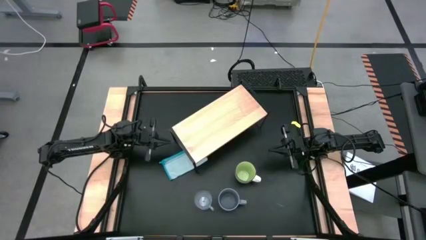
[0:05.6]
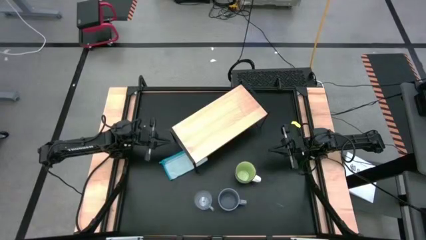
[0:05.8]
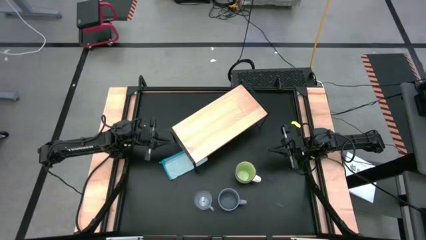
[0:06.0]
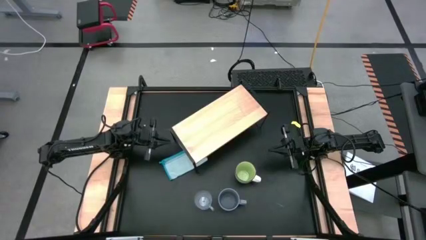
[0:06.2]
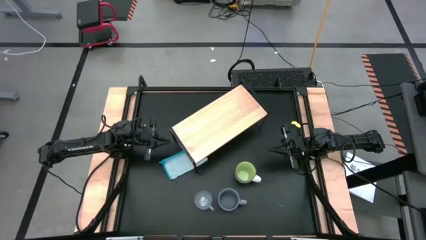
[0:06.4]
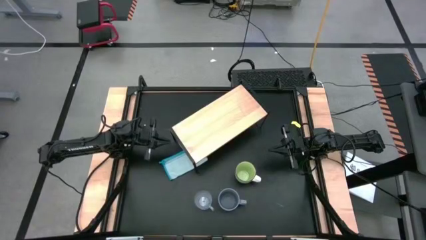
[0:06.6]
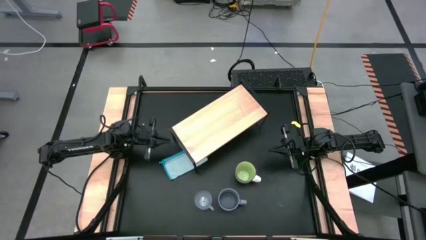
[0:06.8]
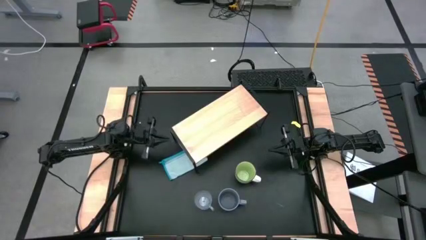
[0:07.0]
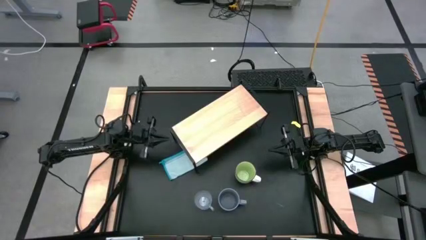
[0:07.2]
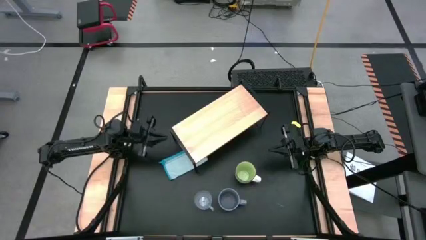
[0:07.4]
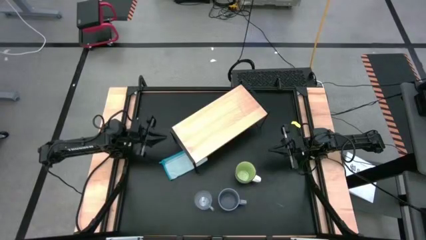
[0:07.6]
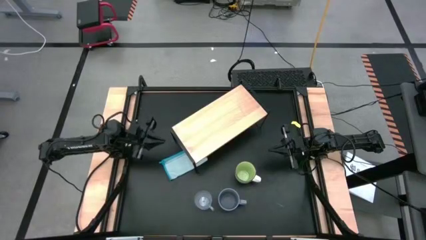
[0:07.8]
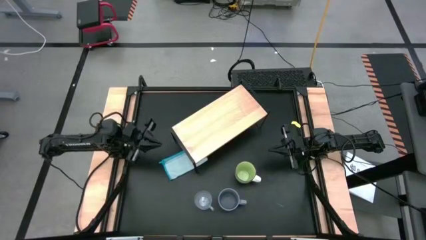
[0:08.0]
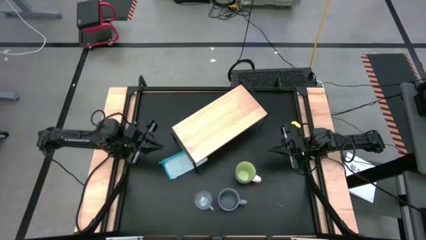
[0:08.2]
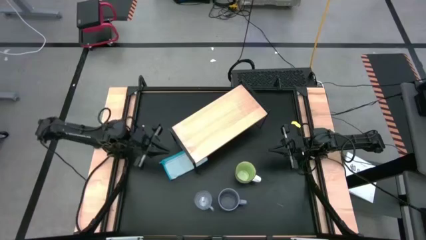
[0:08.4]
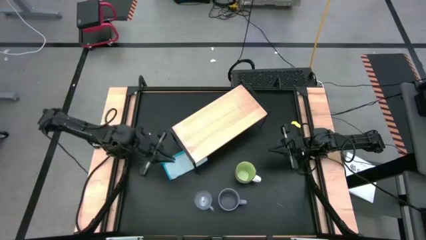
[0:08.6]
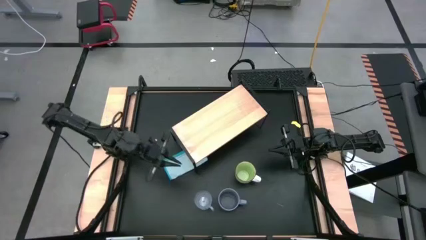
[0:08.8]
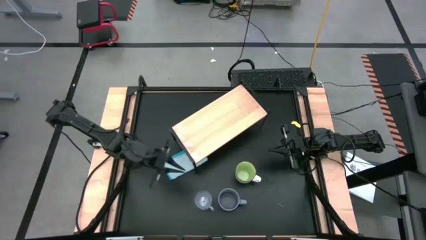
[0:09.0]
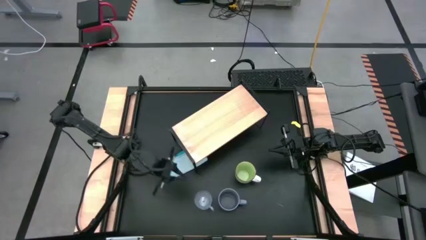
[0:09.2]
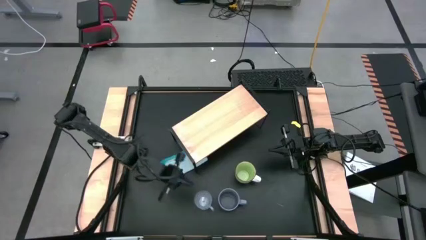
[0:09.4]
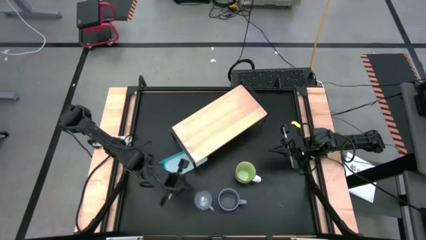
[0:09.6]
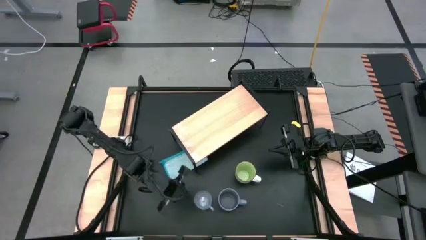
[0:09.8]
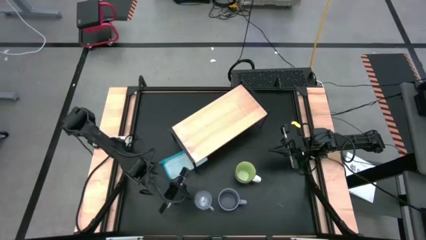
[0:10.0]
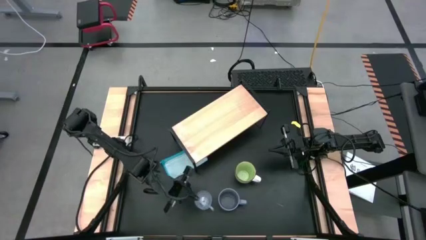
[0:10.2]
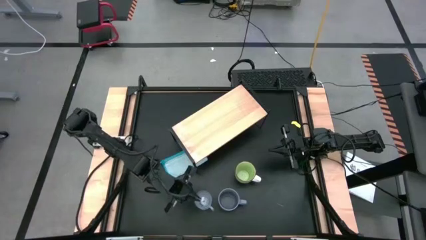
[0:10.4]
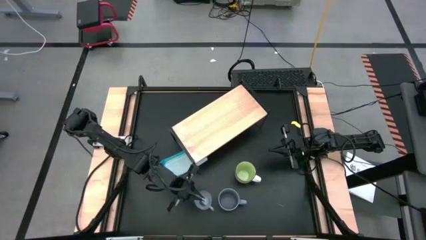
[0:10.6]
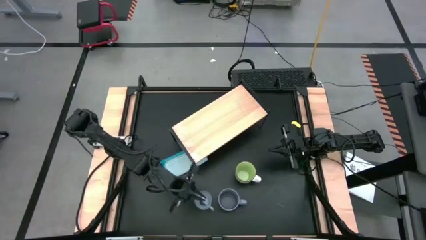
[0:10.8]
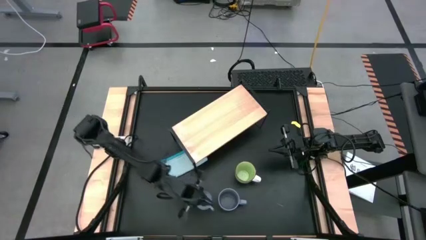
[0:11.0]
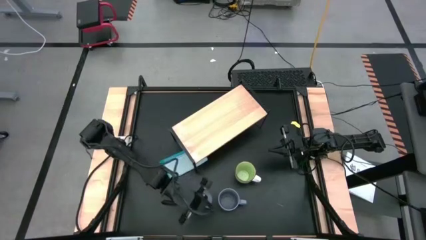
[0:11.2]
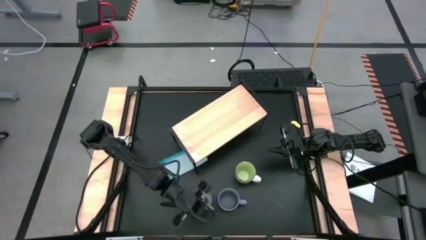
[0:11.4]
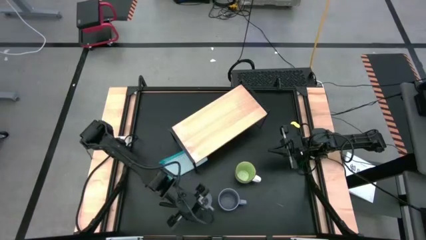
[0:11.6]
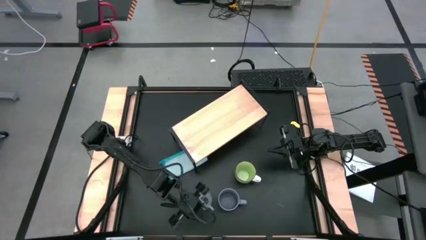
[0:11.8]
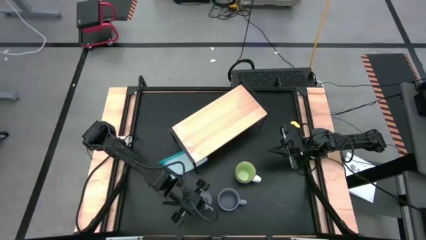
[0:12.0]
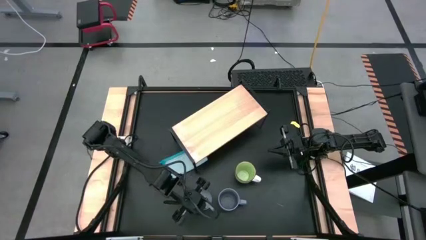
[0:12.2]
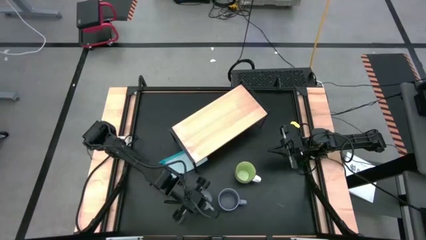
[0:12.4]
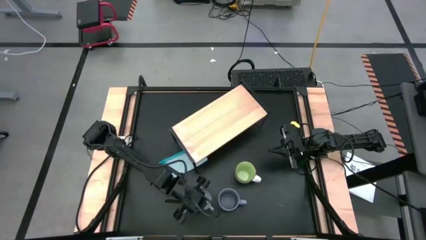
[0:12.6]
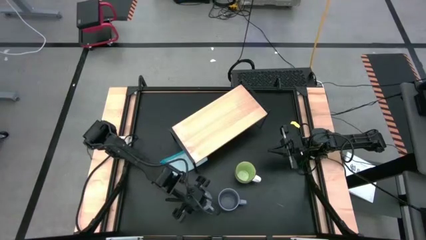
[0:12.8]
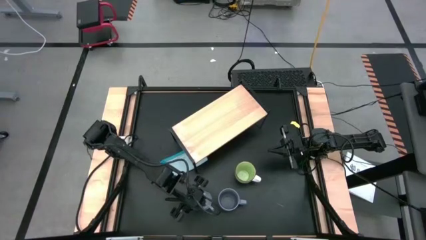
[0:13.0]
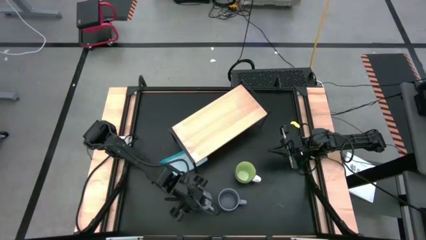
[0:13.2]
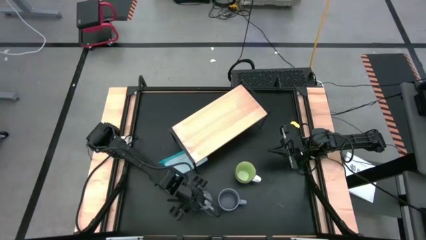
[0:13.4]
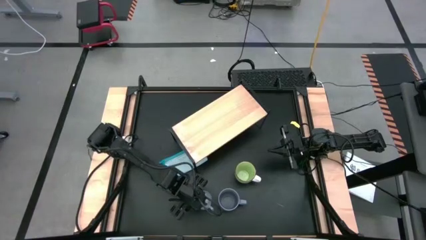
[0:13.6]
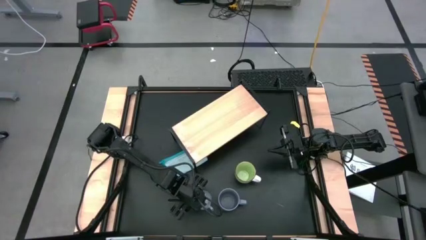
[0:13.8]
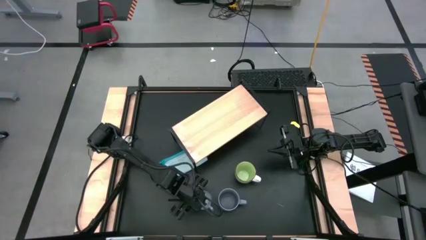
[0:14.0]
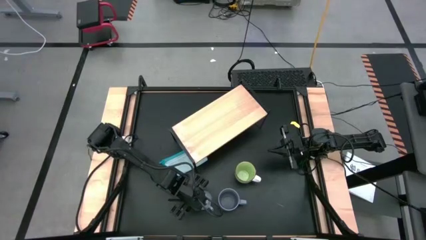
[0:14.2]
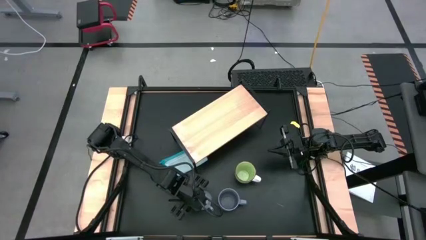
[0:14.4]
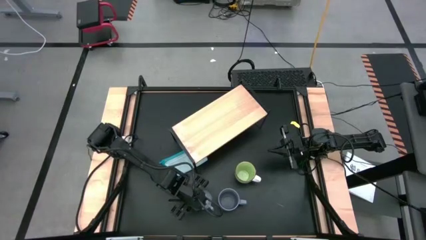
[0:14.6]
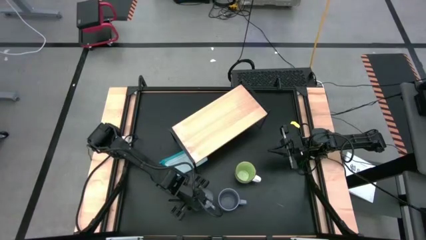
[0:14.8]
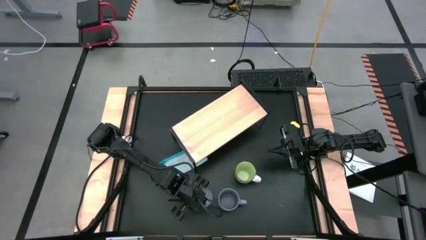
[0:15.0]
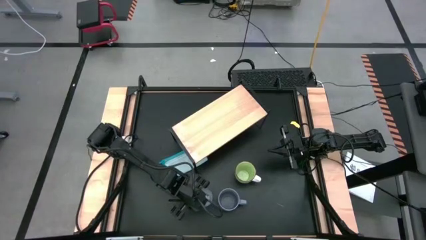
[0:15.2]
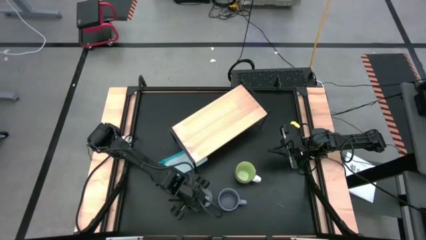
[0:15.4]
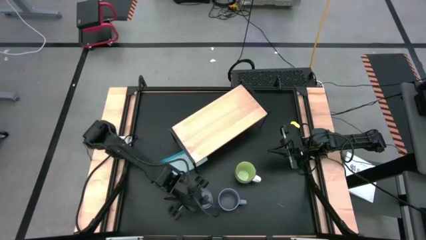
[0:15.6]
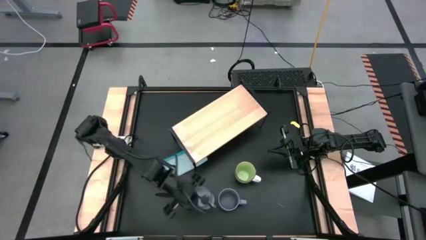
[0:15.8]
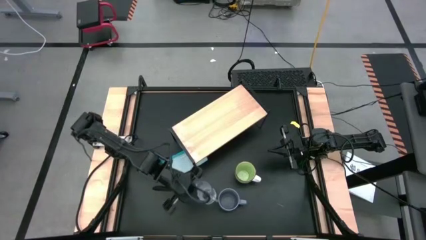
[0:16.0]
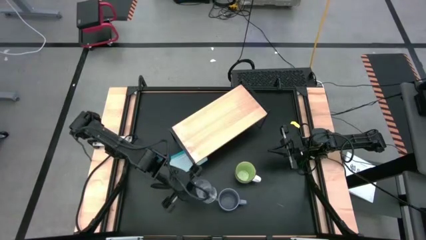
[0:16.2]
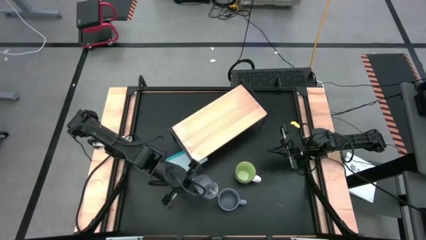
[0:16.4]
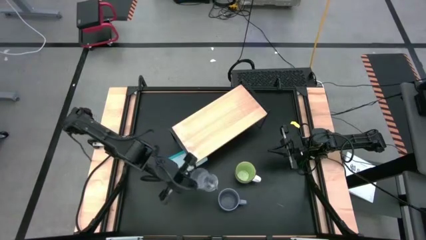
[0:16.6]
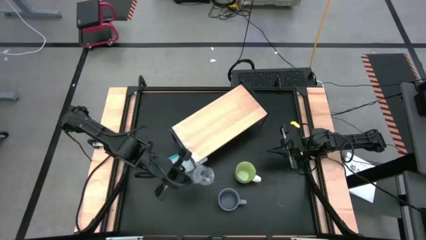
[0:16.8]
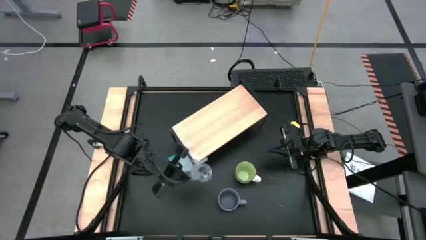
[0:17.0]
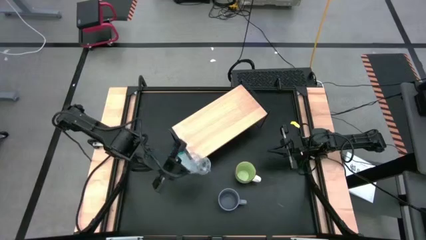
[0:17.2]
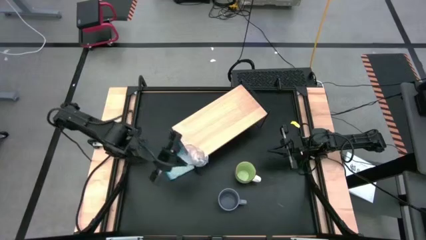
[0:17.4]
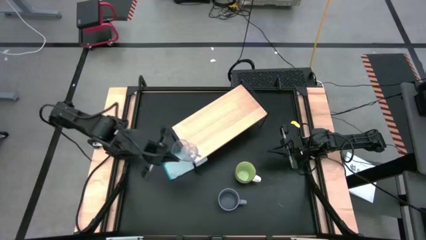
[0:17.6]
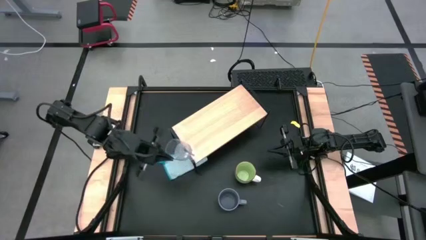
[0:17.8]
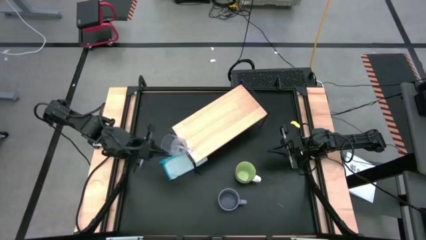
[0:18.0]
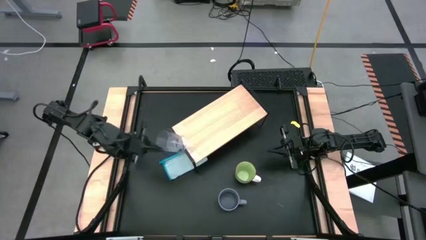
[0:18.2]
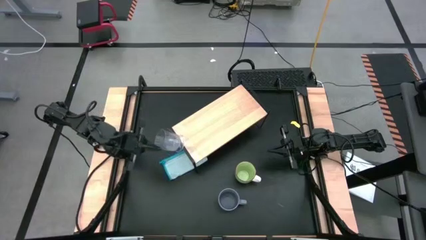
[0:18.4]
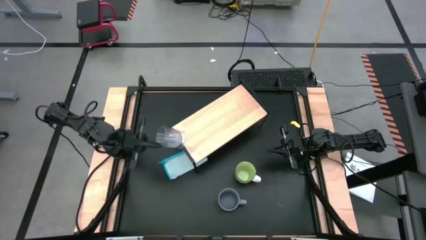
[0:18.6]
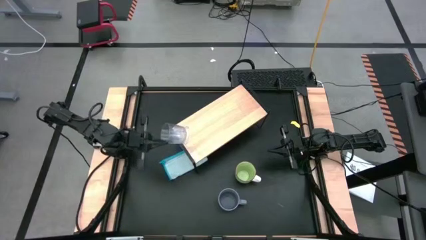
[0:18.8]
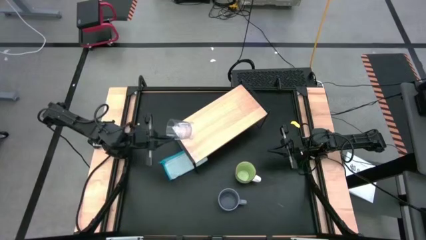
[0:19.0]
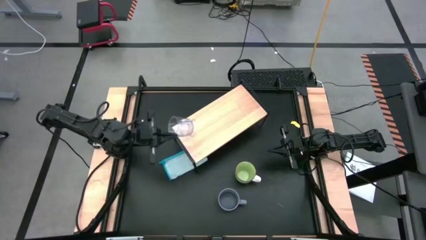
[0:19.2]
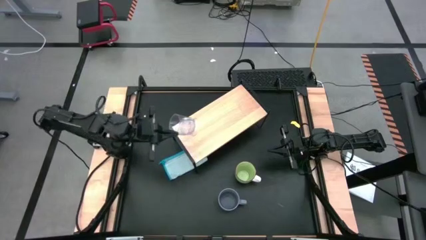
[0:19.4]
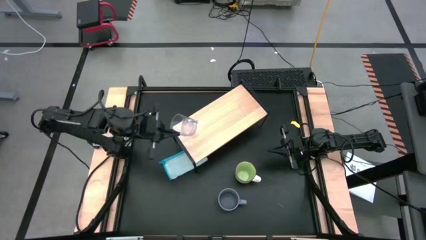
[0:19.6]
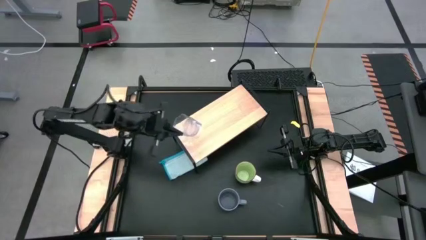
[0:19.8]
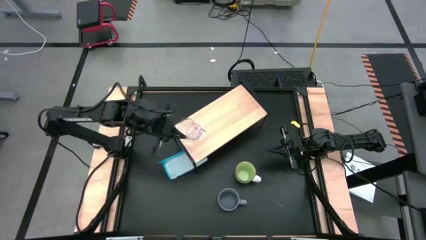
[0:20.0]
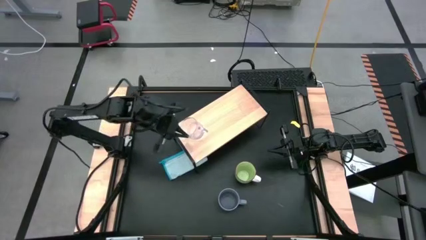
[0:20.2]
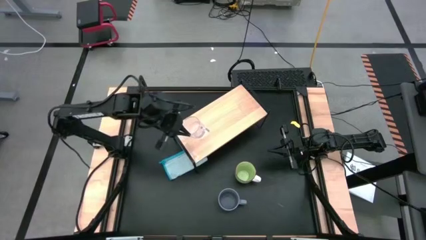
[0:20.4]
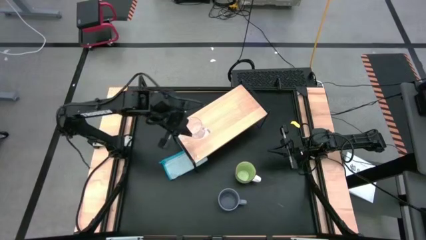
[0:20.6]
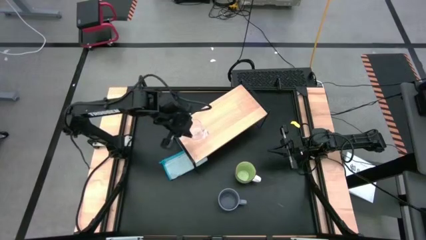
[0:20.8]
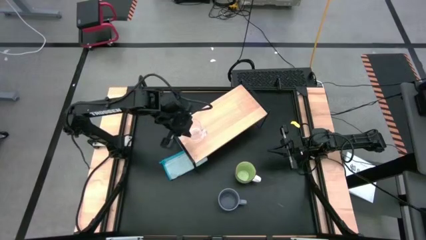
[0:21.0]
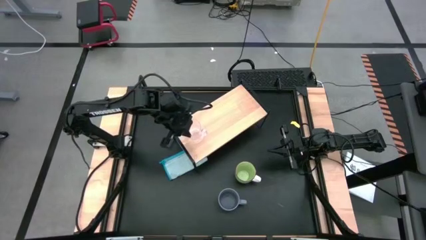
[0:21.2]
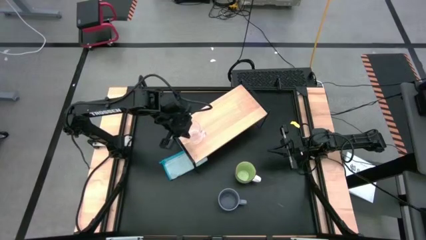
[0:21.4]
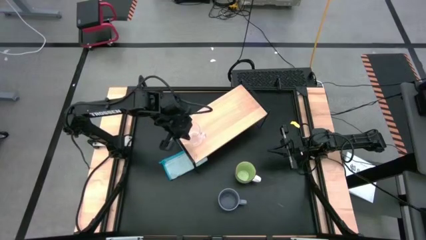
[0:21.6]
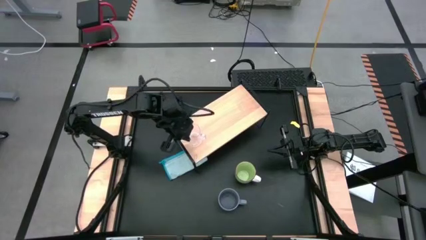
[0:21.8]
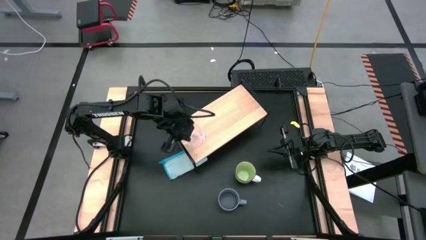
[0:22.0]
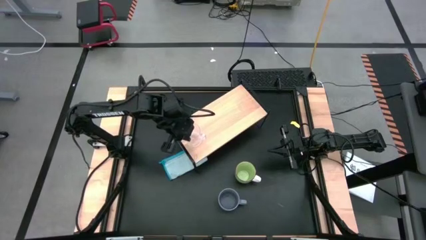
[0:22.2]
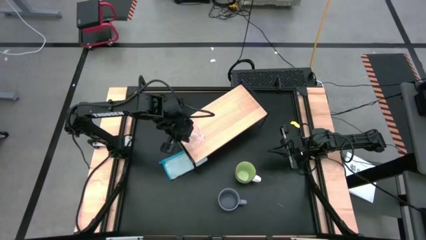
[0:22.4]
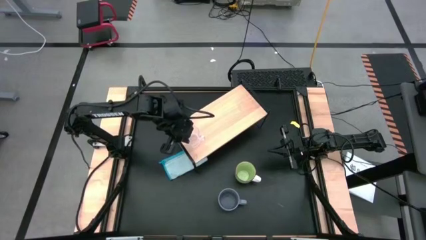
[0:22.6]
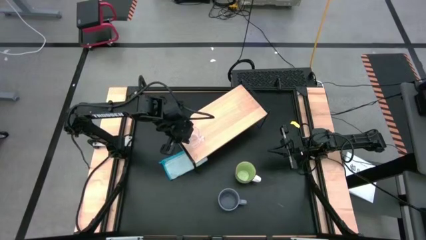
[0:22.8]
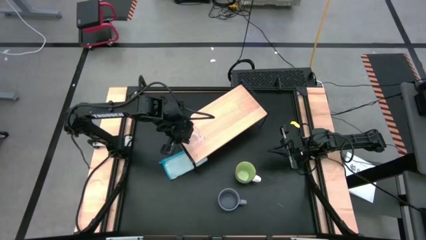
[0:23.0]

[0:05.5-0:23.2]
Task: Stack small to large cups/mugs on shelf
Put the transparent mug on the shelf
